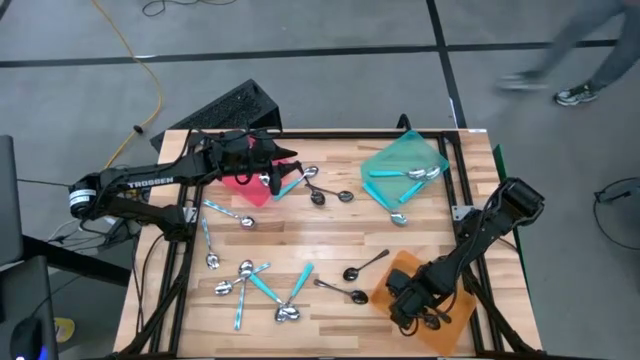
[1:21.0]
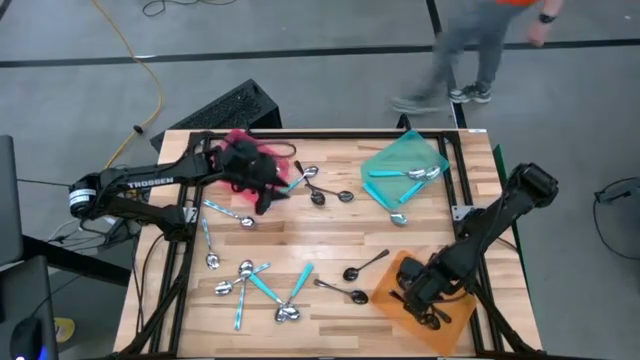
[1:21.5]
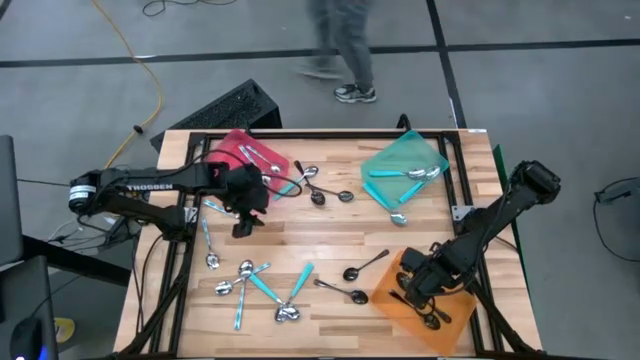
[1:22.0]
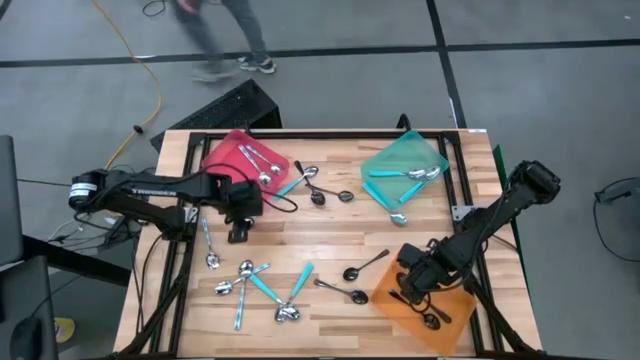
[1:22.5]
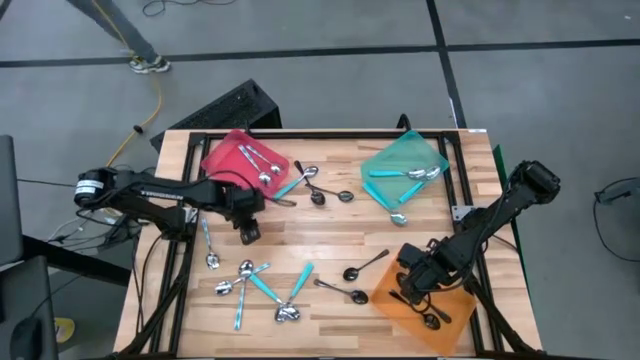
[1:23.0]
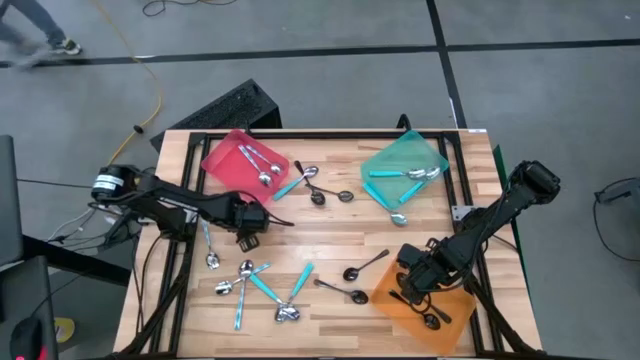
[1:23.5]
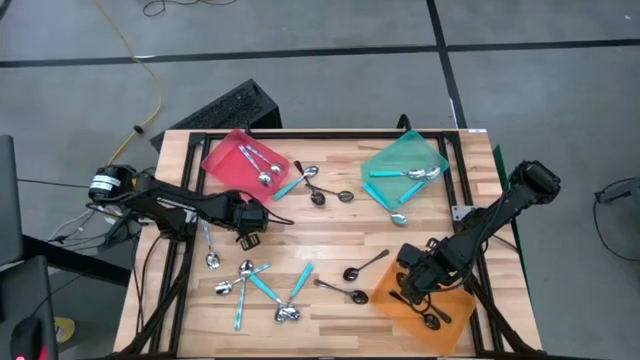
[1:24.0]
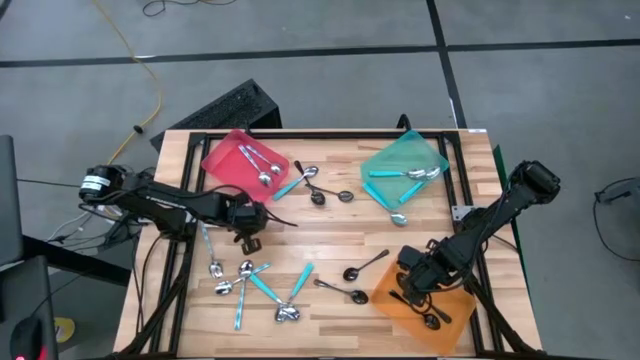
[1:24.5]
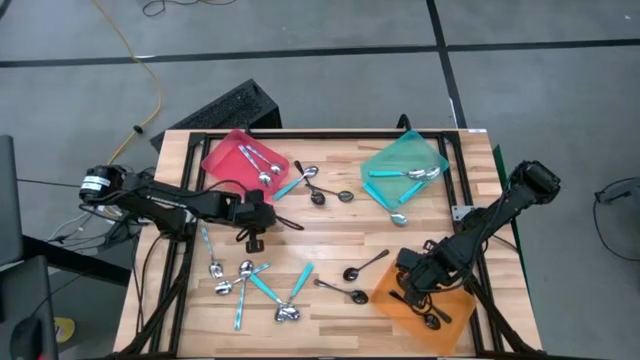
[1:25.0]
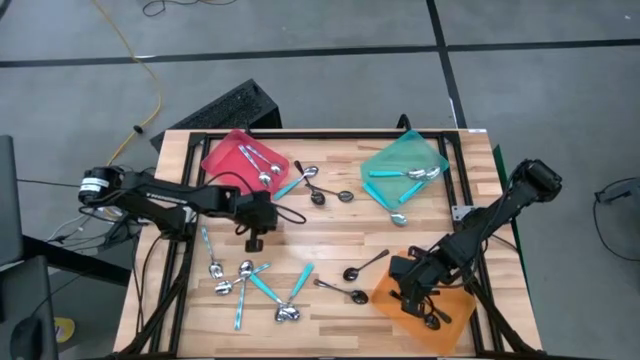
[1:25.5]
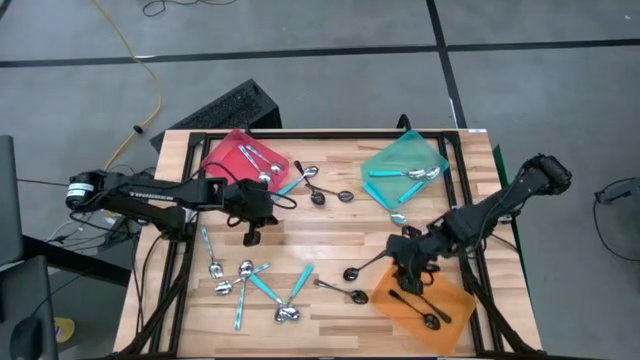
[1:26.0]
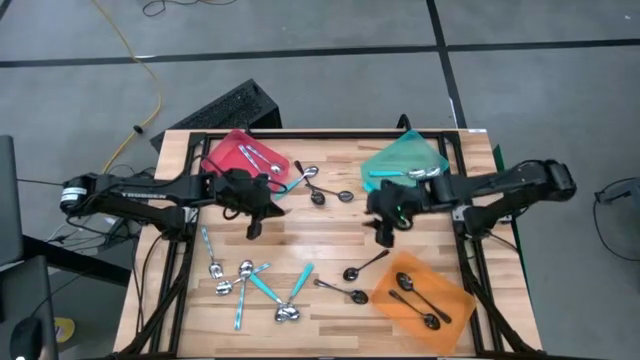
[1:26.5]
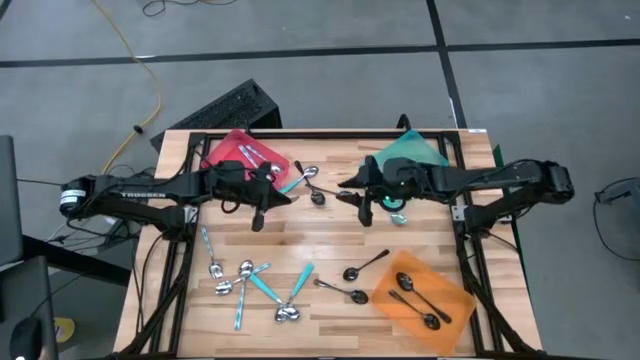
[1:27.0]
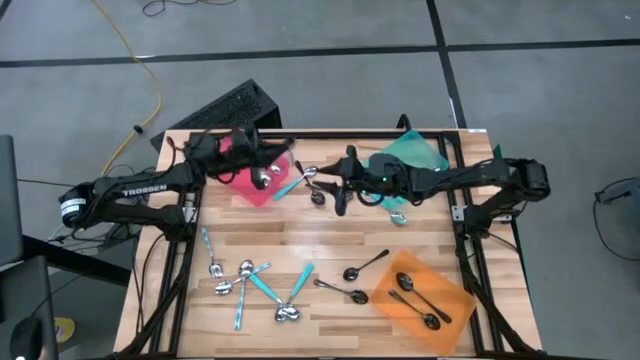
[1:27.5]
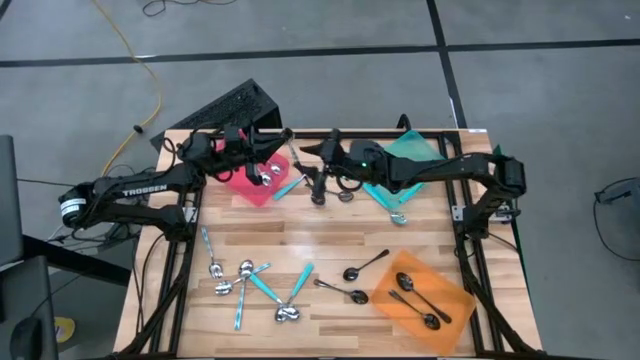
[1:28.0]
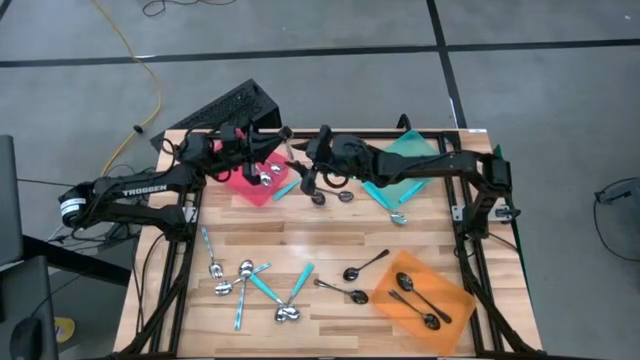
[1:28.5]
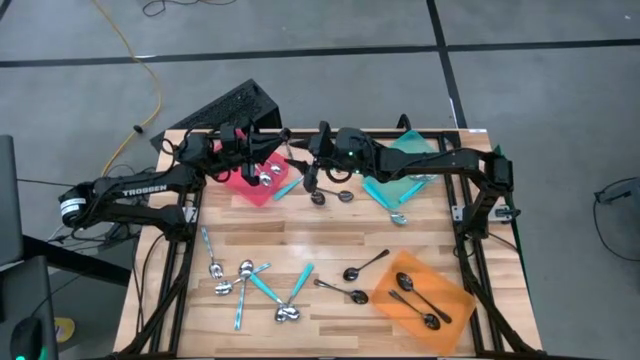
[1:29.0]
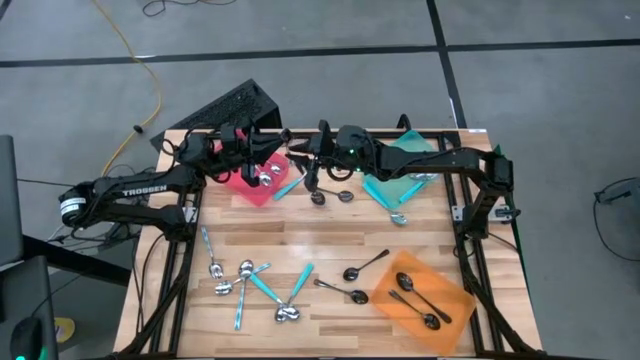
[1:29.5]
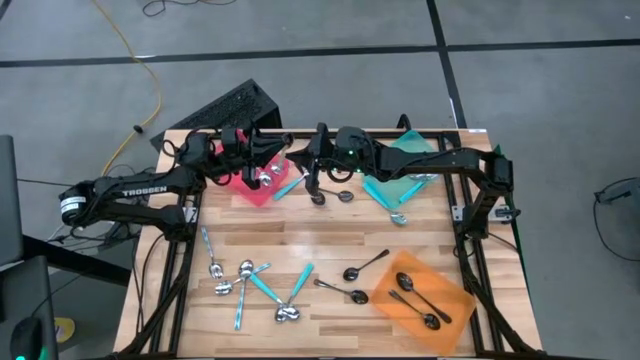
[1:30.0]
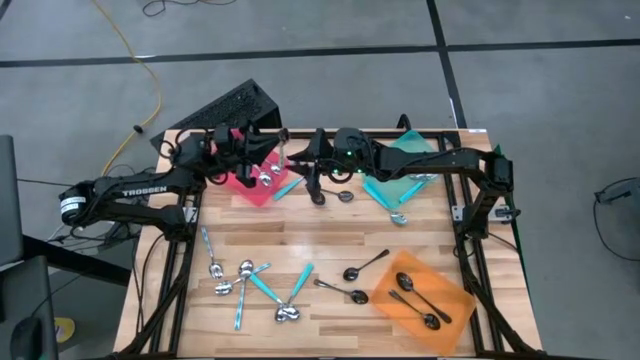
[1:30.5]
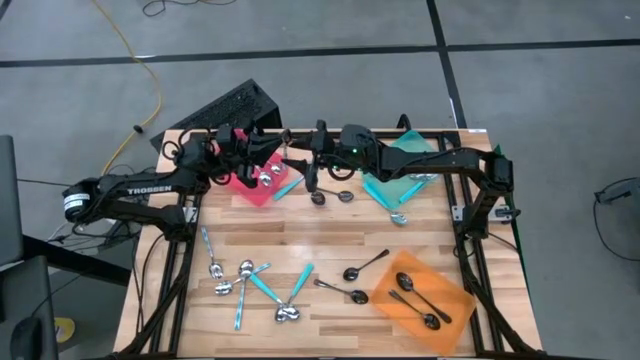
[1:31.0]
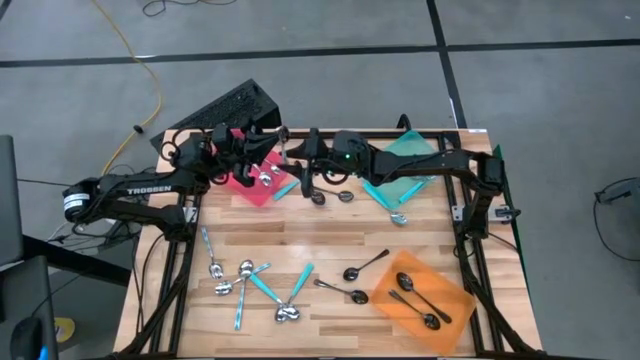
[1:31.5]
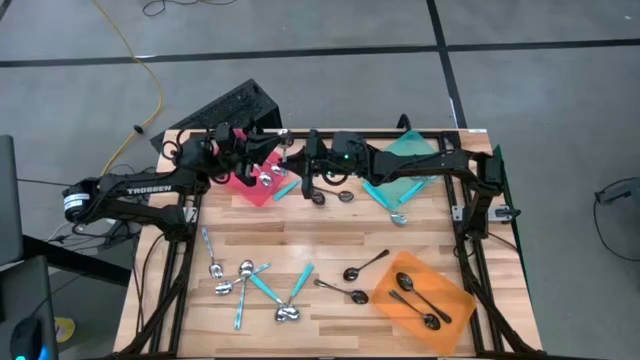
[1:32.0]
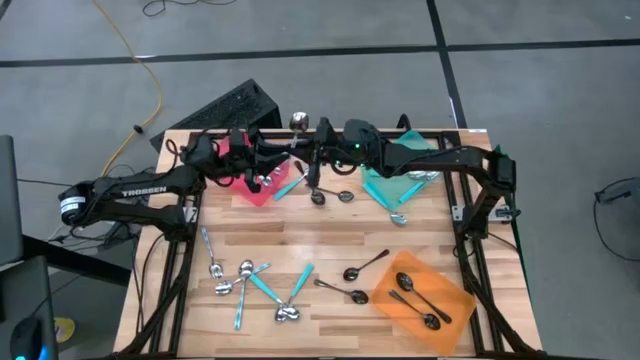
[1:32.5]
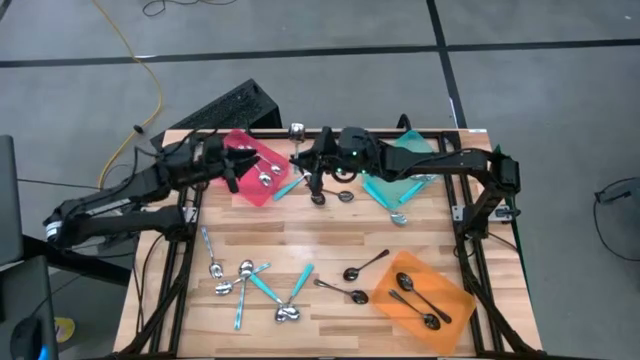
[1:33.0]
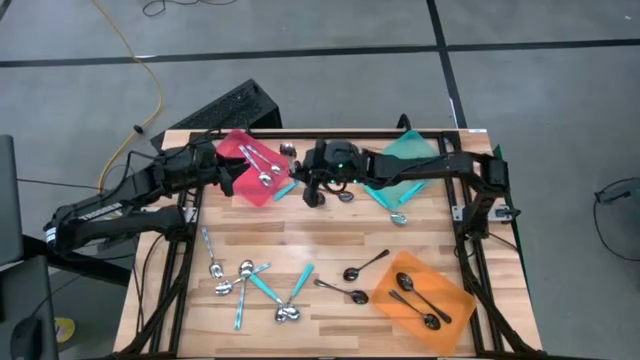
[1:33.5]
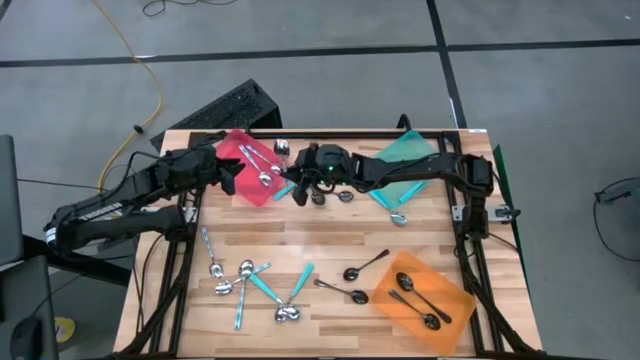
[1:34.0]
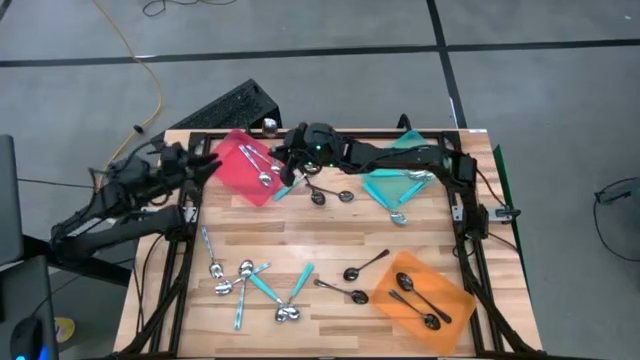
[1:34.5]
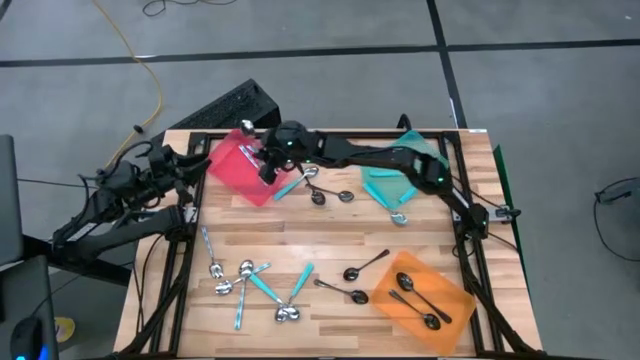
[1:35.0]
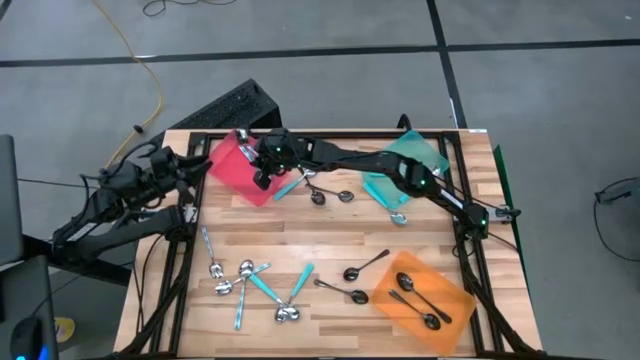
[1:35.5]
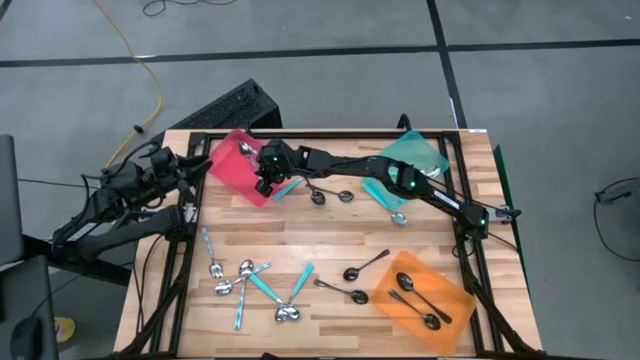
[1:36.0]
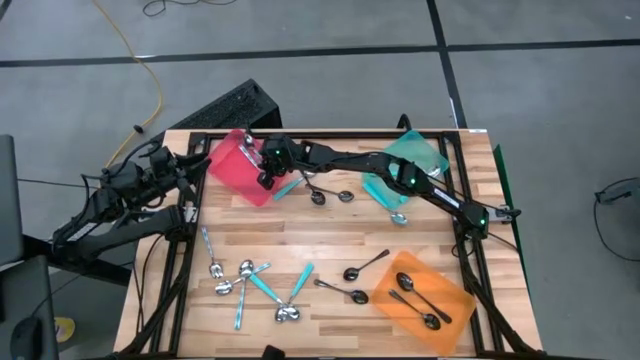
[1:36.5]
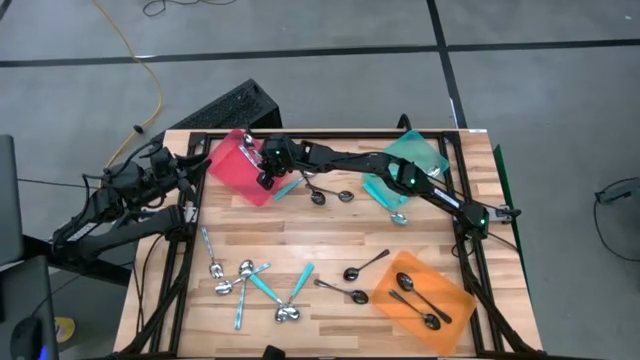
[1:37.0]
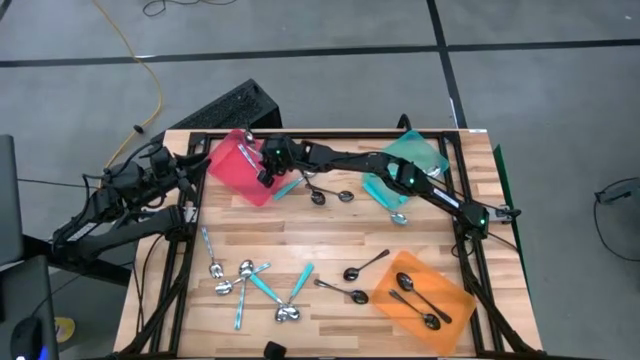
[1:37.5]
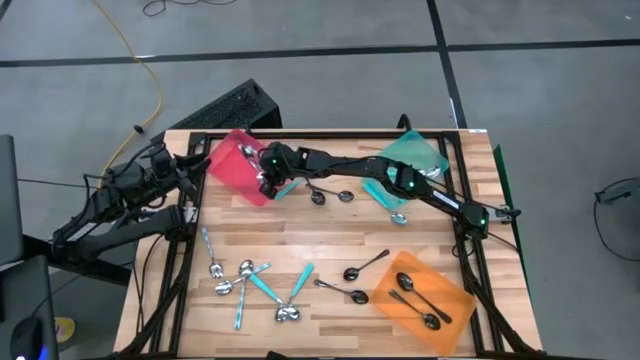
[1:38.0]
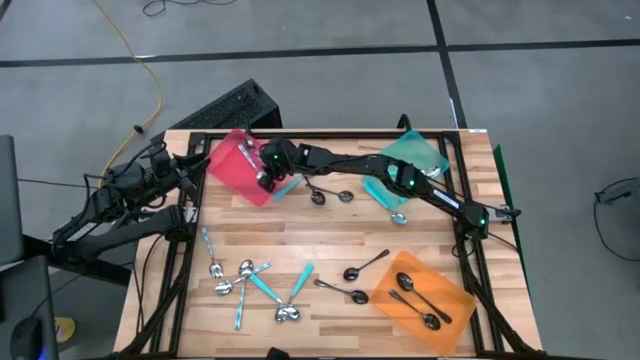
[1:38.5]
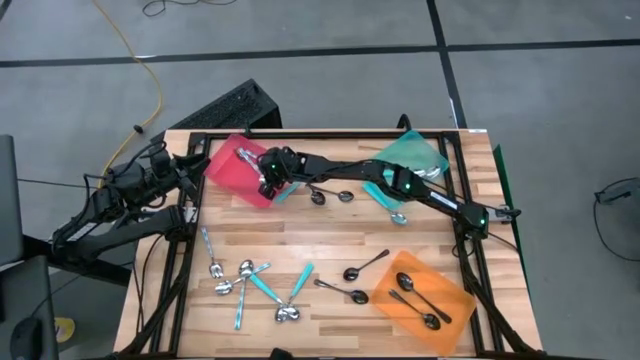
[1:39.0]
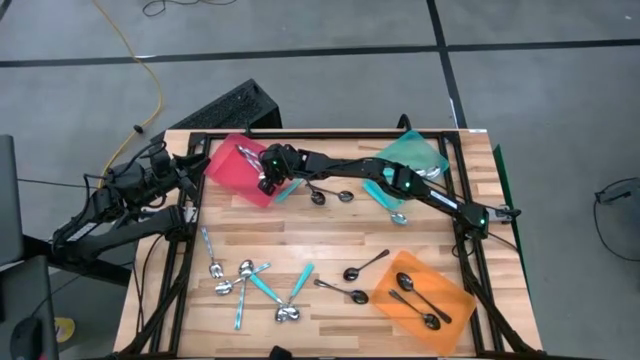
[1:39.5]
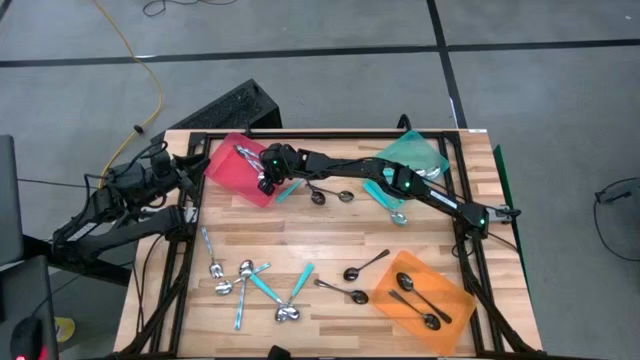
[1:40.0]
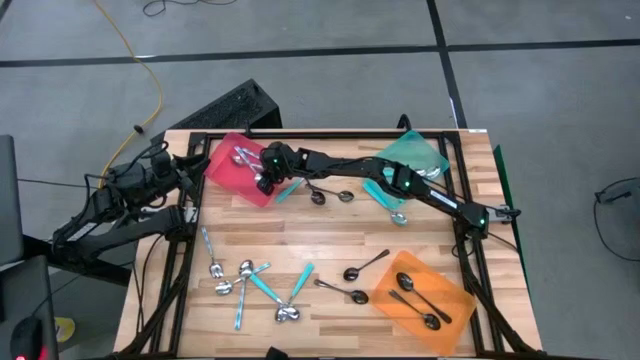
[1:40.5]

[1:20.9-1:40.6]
Task: Sort silverware by color (type)
Put the blue patterned spoon into the red bin

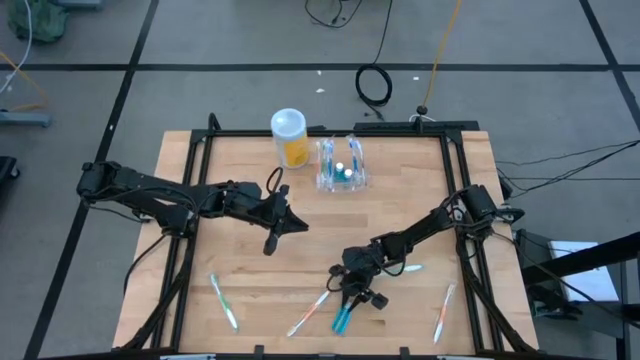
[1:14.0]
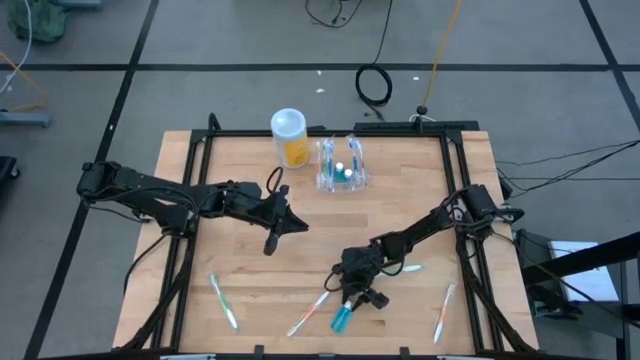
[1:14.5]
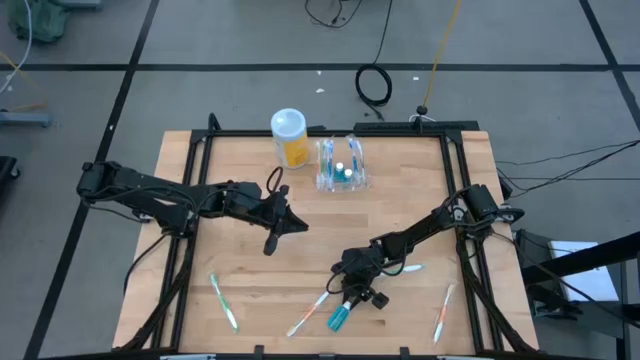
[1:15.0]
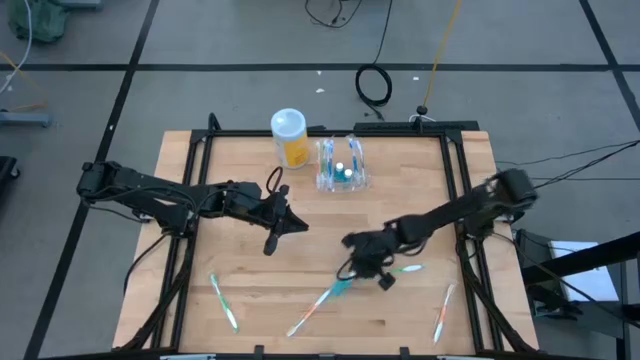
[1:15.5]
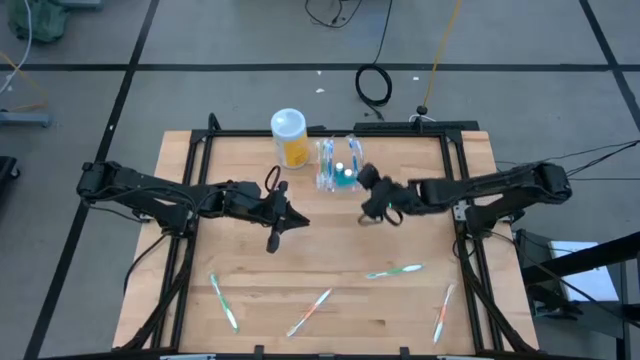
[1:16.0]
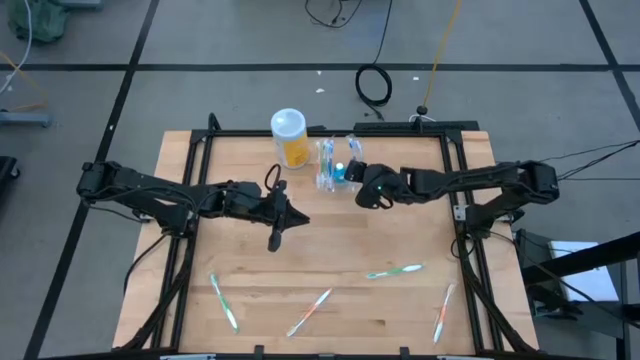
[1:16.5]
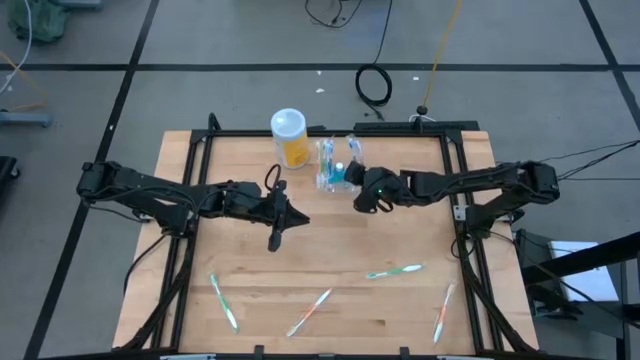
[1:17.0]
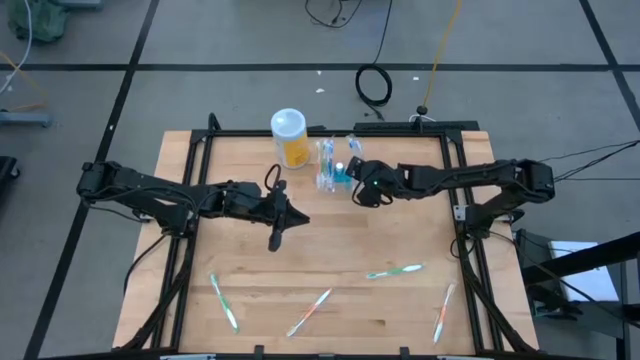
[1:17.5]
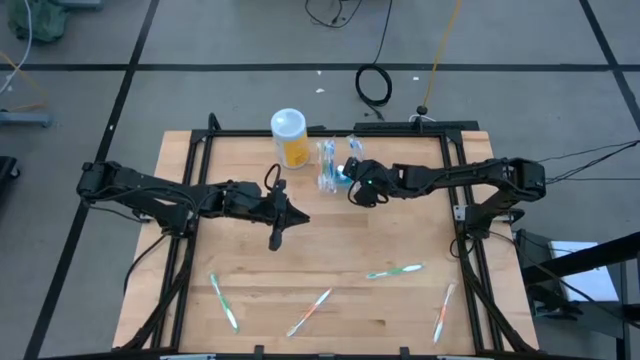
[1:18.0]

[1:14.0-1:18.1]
Task: Pick & Place toothbrushing station
Put the mouthwash into the transparent organizer
